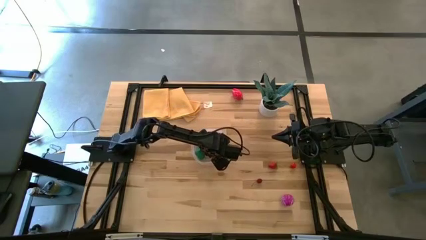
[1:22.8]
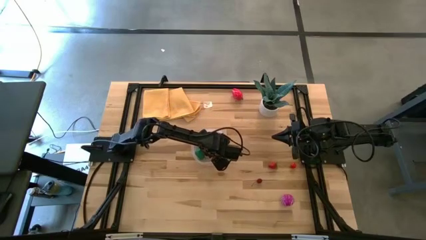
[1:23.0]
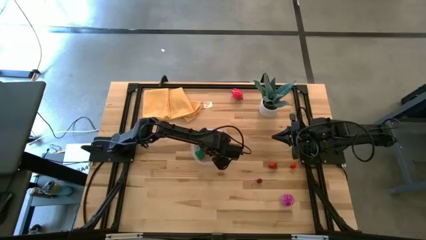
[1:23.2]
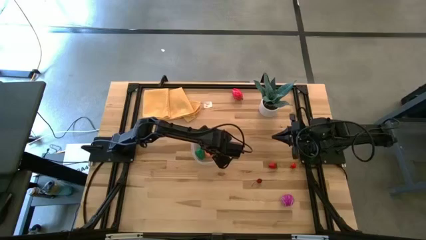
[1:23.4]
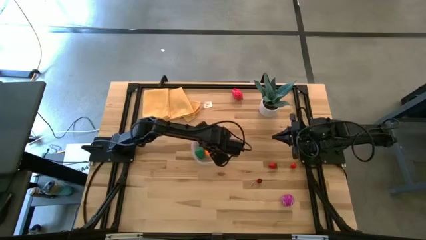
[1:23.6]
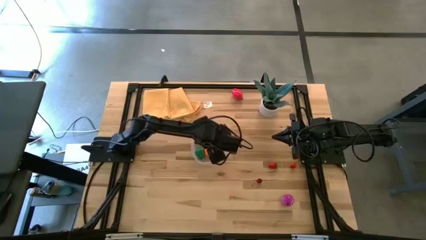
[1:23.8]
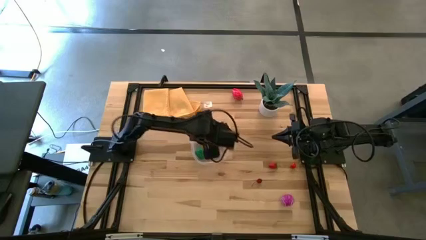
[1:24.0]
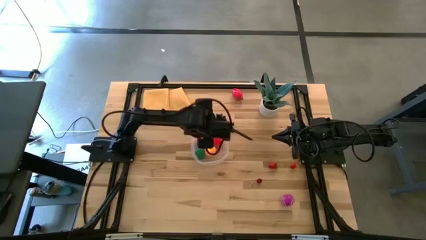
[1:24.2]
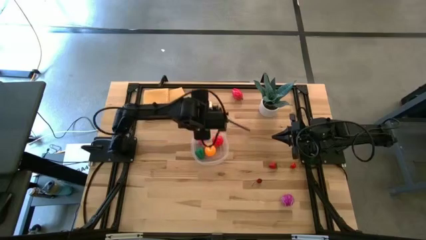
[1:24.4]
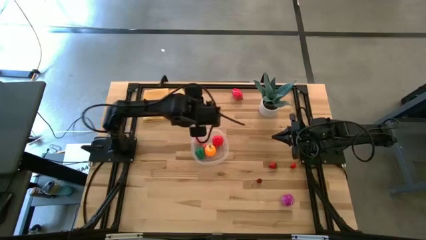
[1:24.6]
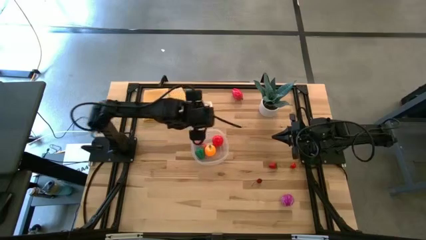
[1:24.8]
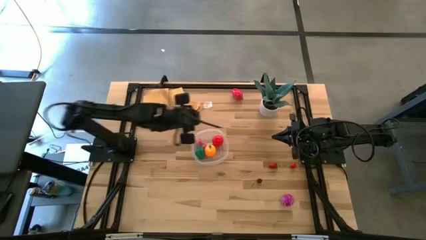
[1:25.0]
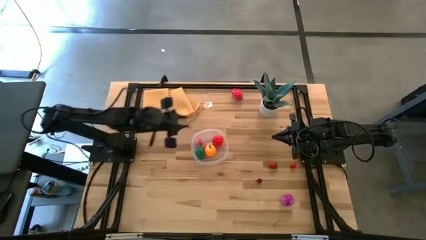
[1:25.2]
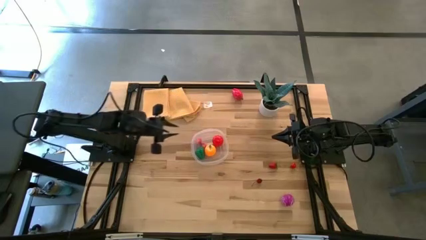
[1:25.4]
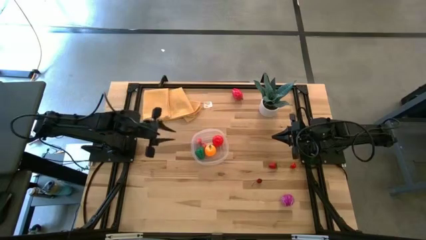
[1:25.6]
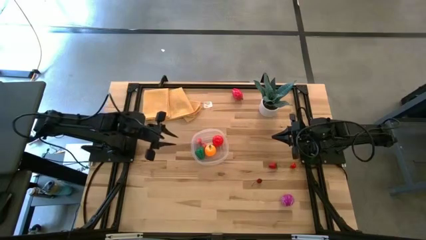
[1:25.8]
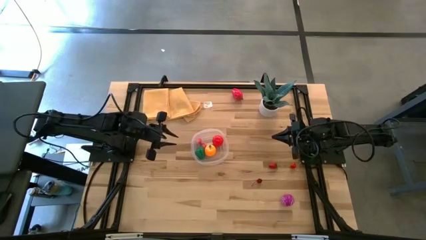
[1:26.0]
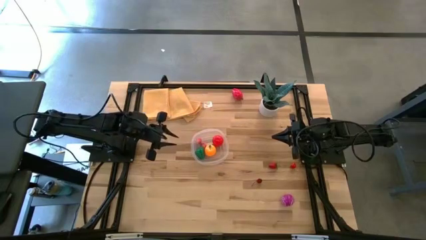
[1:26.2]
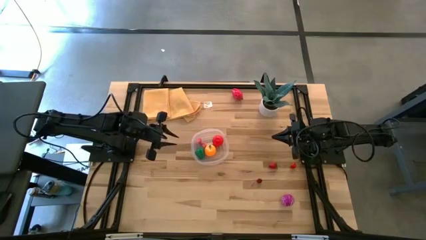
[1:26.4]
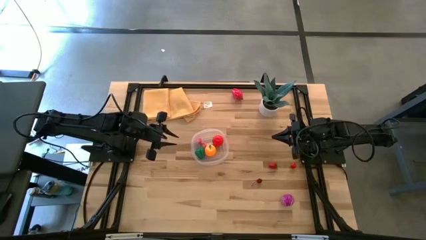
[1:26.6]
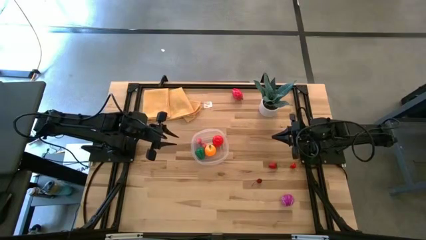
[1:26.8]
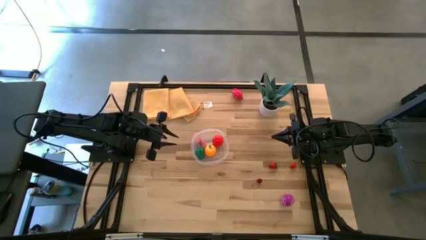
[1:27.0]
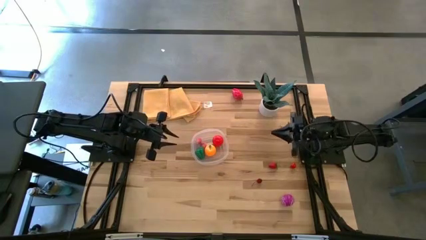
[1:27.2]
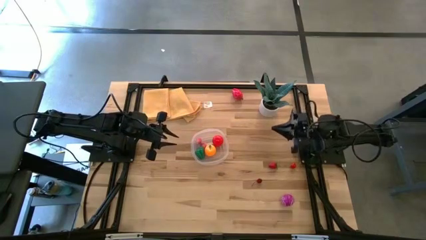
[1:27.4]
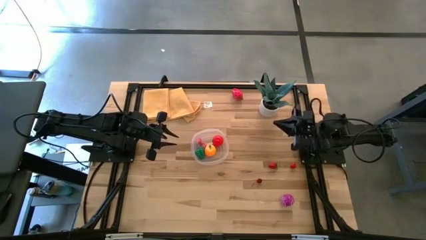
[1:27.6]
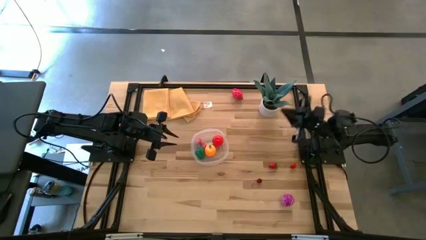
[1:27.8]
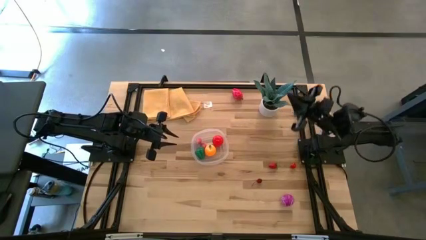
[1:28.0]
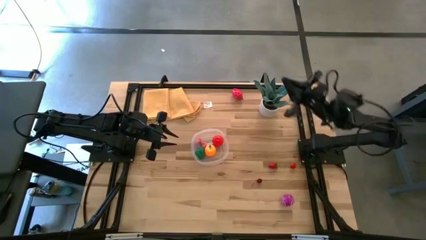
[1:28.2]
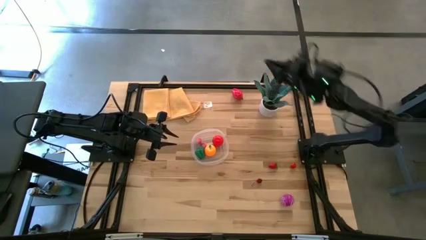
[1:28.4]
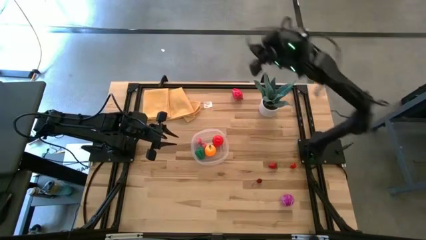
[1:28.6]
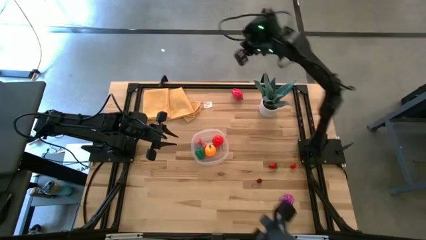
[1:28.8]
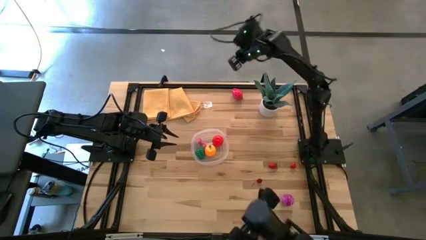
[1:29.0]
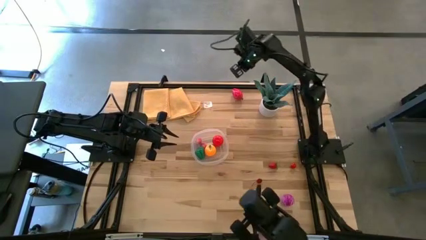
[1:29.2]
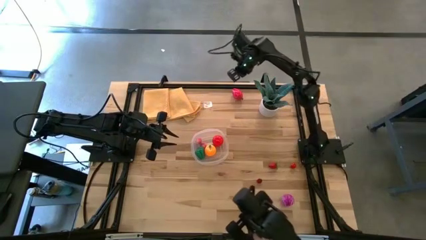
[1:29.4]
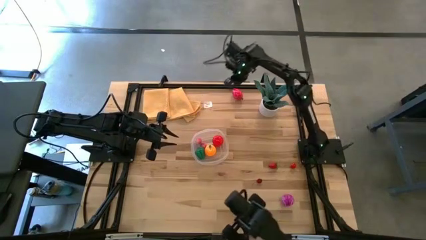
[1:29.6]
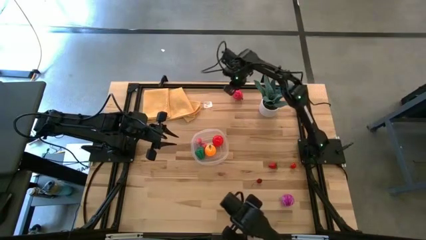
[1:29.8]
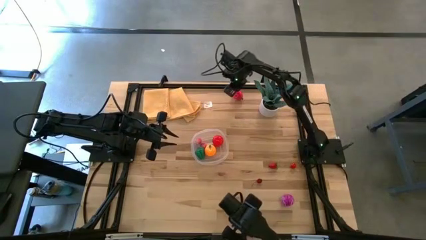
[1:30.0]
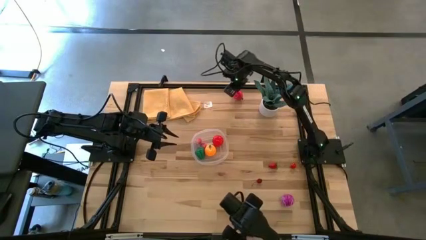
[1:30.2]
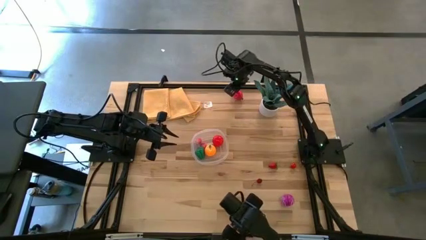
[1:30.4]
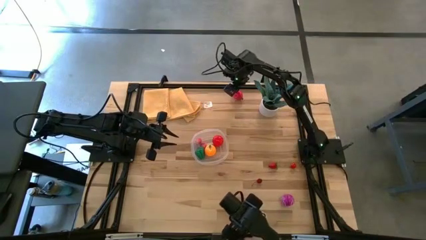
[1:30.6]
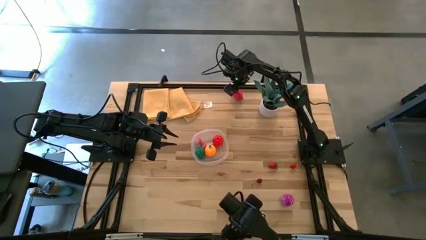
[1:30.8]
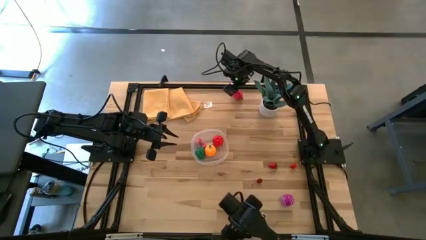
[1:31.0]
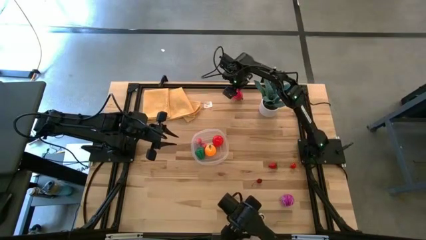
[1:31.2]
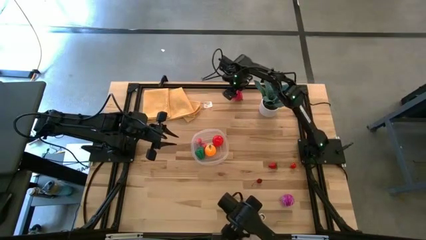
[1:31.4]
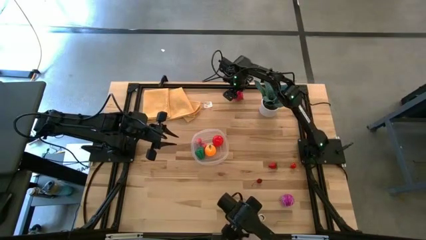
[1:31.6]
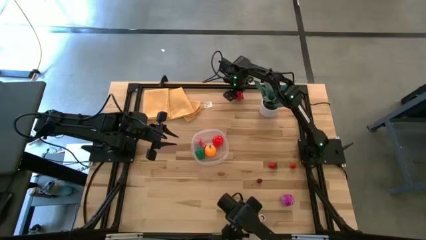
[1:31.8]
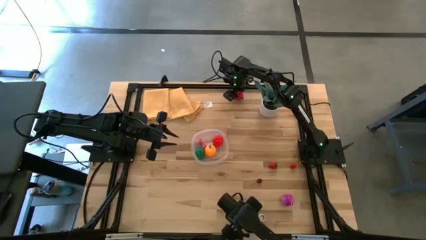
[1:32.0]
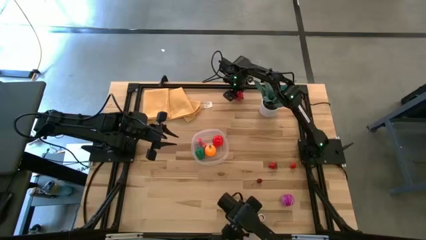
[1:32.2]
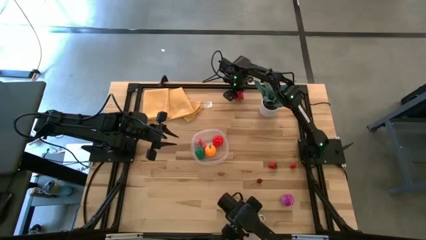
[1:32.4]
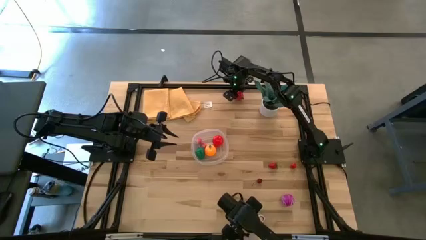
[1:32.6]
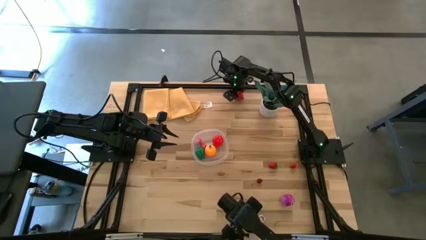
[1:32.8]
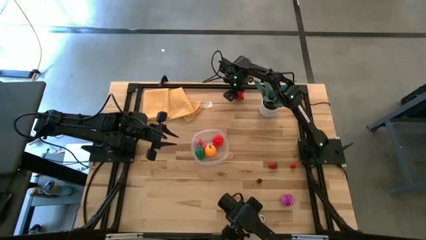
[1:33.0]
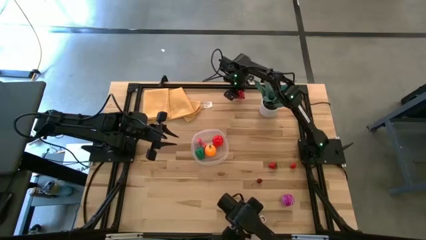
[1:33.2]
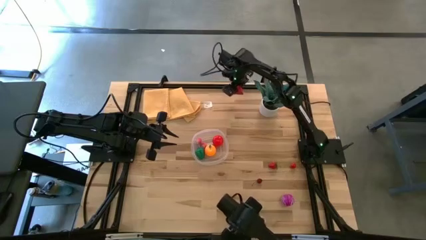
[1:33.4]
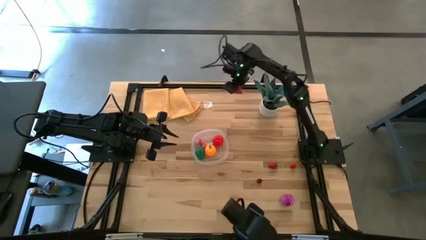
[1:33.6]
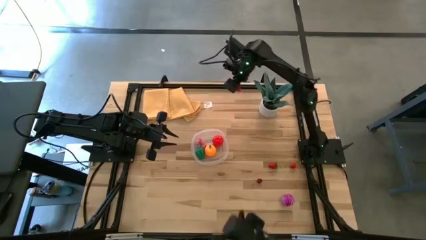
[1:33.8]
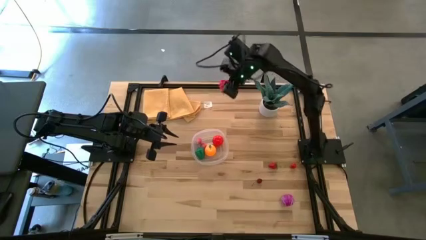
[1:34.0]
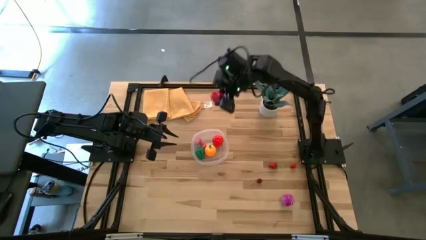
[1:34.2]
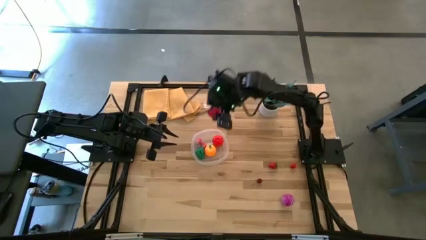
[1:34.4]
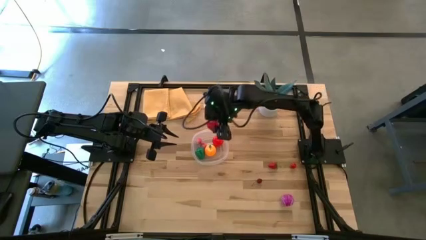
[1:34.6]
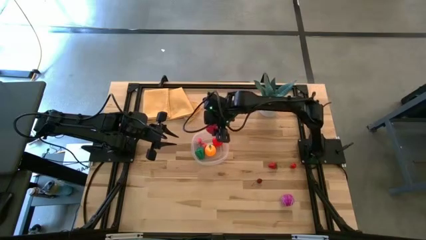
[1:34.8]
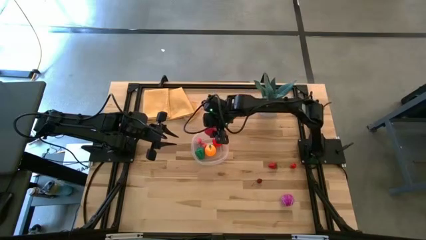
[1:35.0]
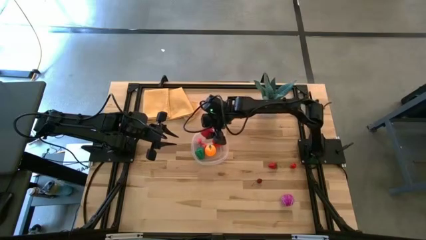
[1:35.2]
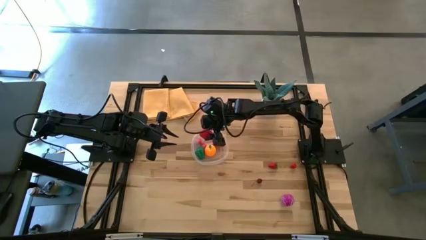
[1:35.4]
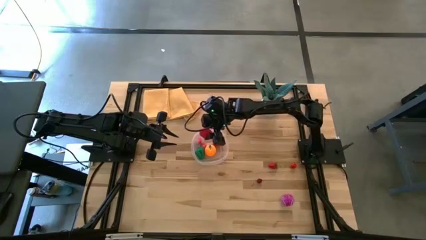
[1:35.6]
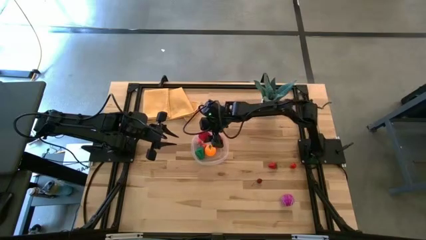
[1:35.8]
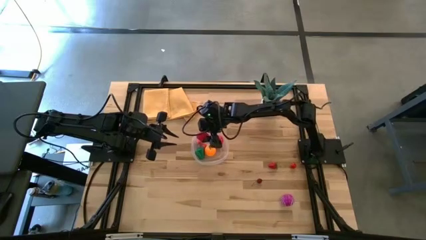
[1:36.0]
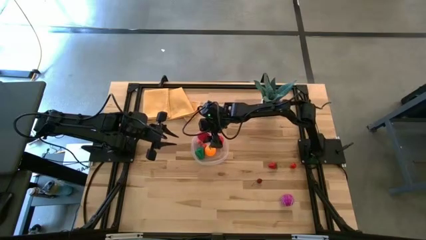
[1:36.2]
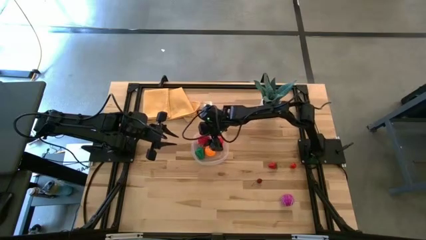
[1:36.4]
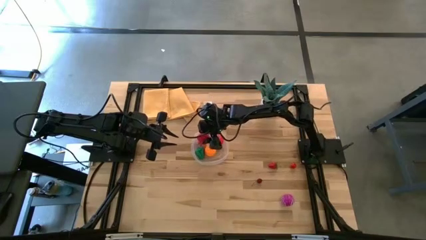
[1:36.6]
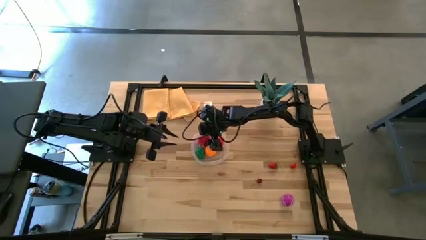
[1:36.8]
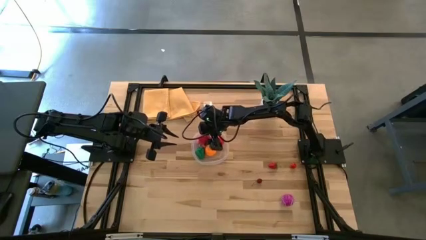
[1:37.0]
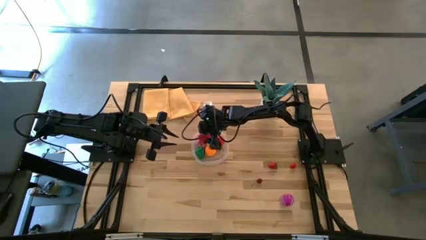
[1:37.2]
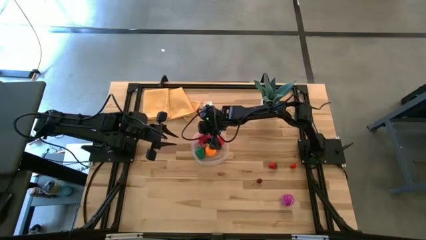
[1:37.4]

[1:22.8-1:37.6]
Task: Pick and placing Produce into tupperware
Put the pink dragonfruit into the transparent bin

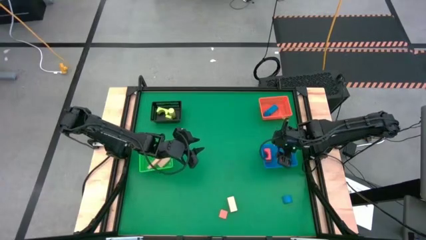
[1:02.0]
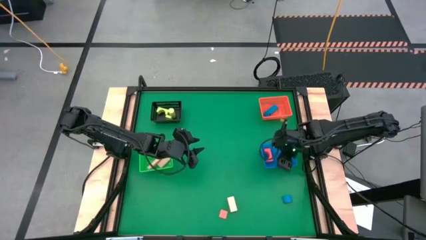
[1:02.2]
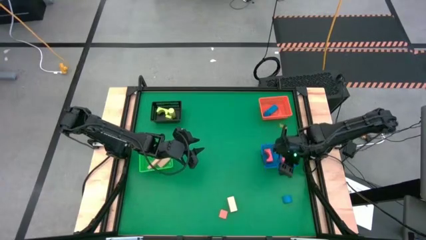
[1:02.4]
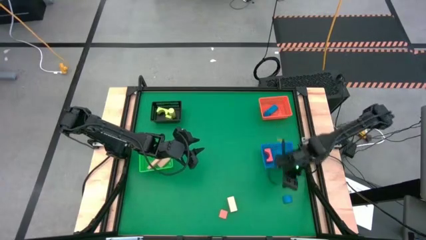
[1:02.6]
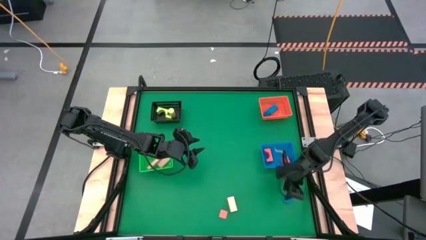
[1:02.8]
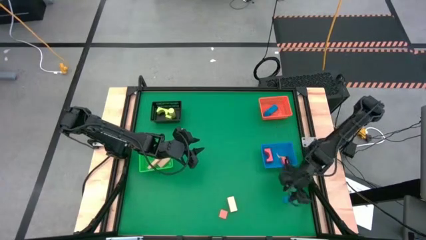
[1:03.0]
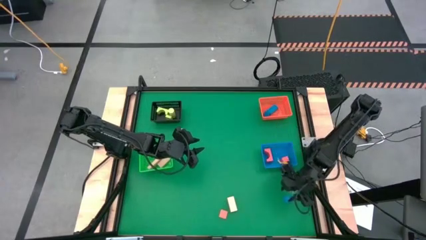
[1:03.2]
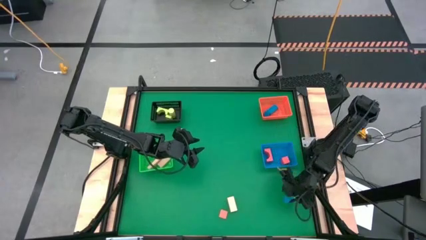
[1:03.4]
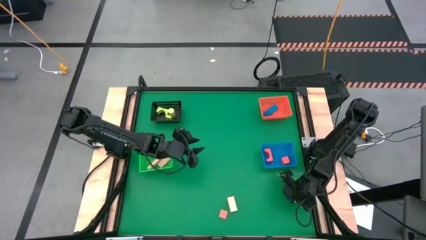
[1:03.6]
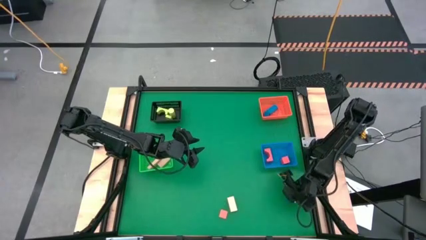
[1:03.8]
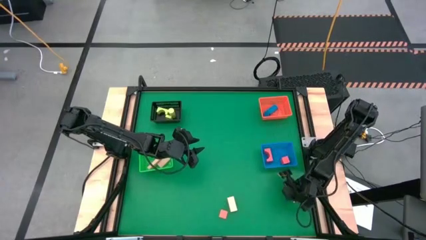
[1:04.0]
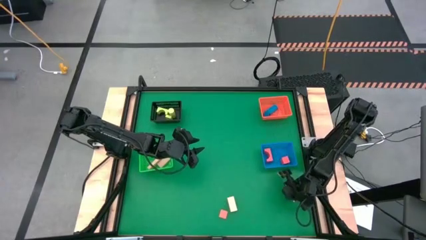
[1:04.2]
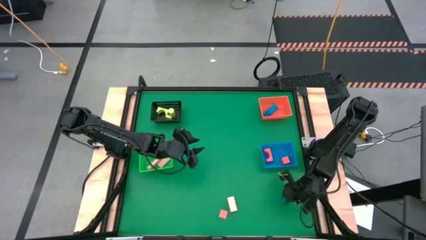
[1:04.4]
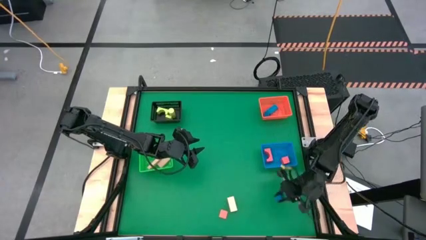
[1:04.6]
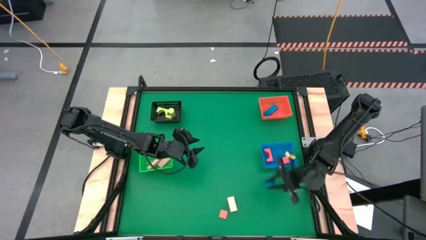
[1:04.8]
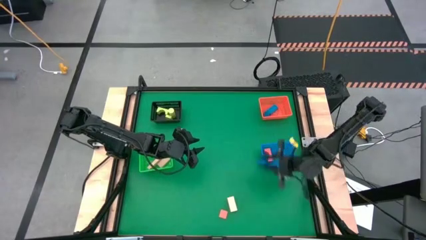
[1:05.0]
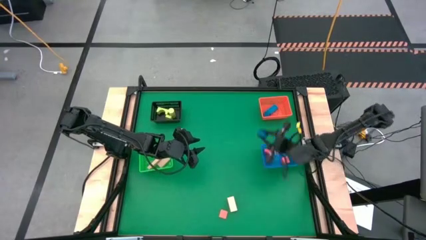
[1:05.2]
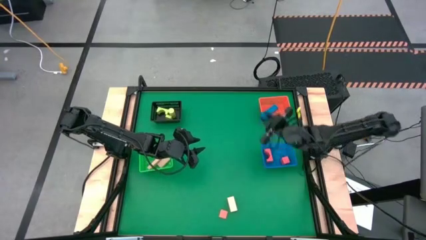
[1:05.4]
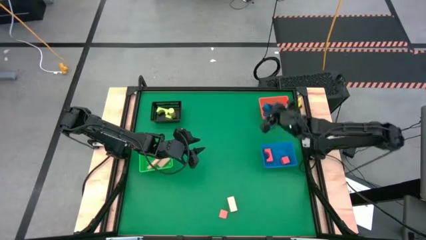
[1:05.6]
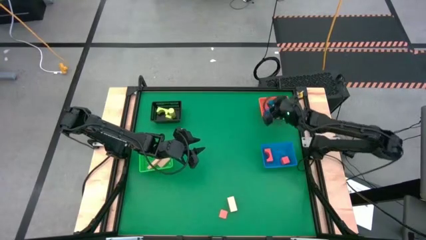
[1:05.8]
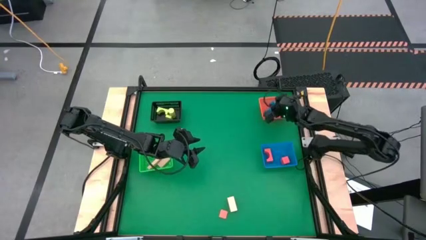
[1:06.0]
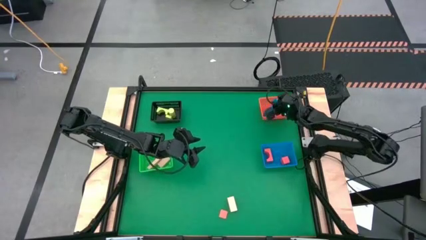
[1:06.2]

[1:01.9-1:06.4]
Task: Sort & place blocks by color
Put the blue block into the orange bin
